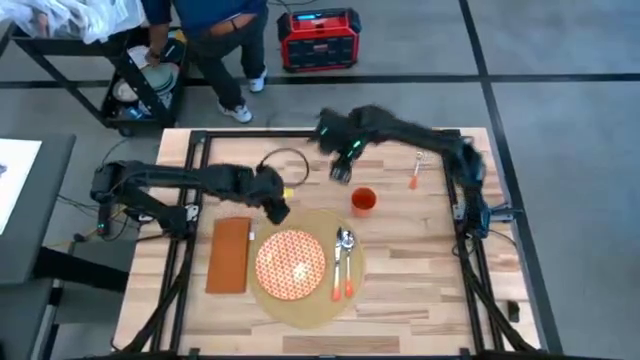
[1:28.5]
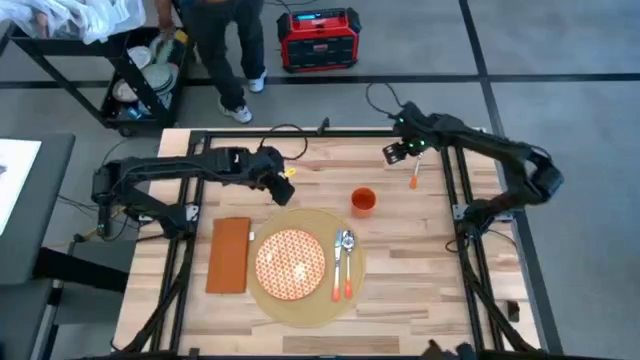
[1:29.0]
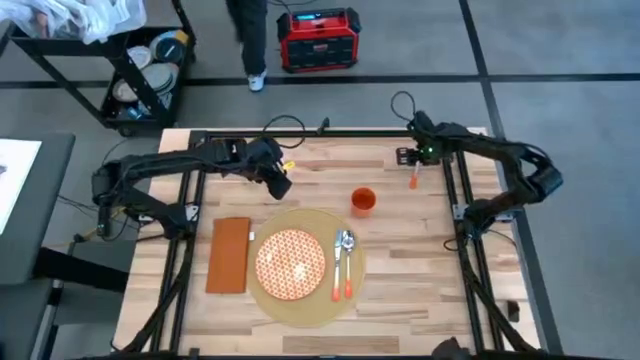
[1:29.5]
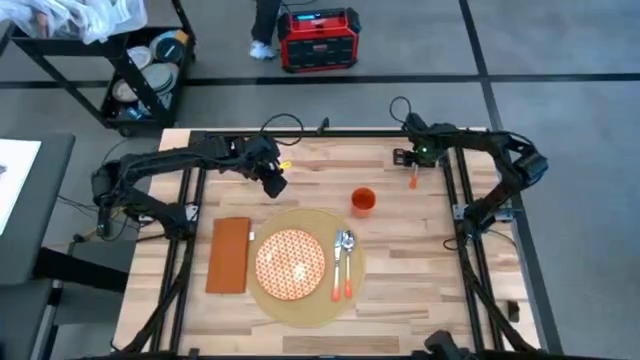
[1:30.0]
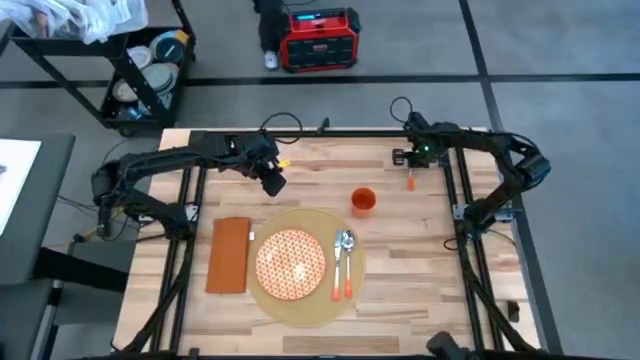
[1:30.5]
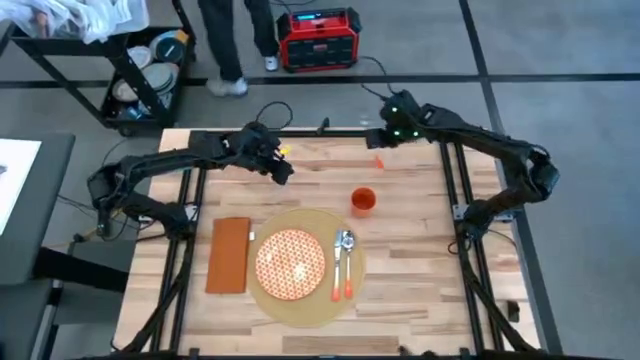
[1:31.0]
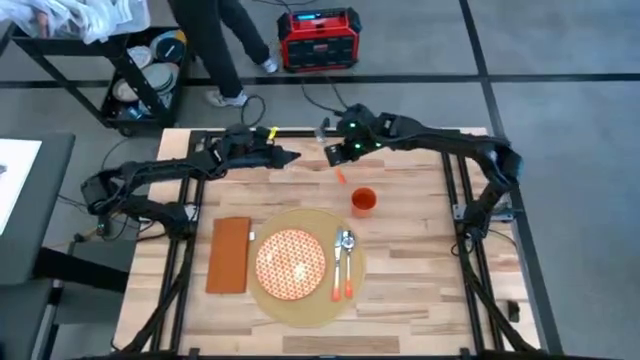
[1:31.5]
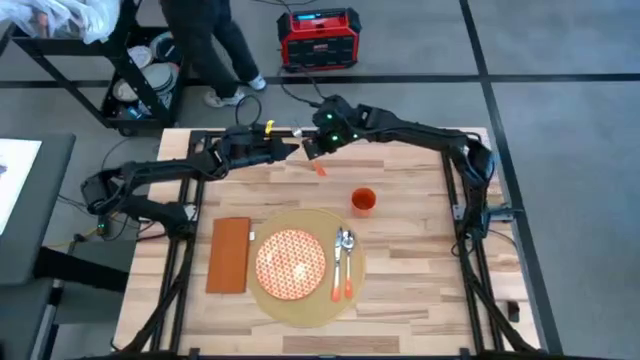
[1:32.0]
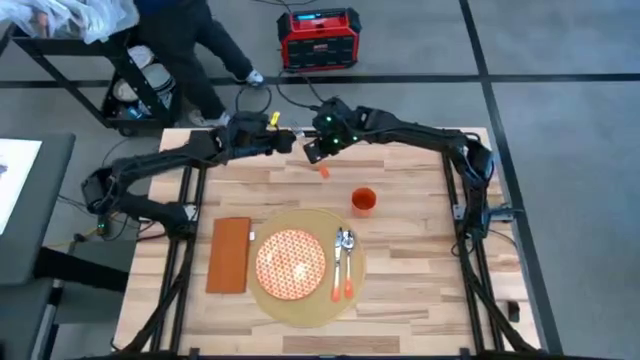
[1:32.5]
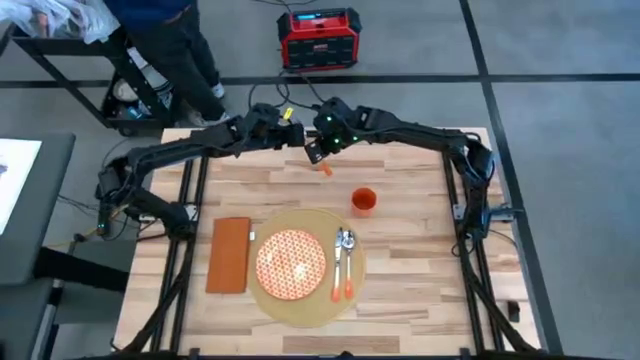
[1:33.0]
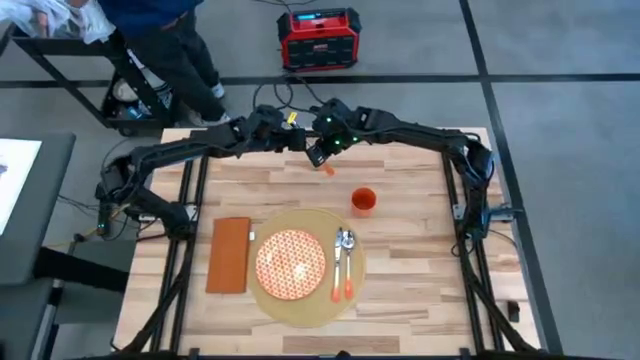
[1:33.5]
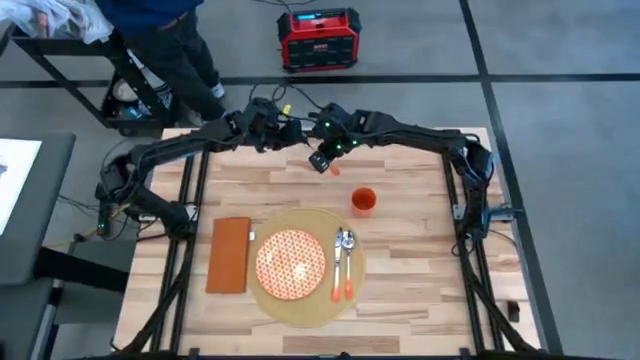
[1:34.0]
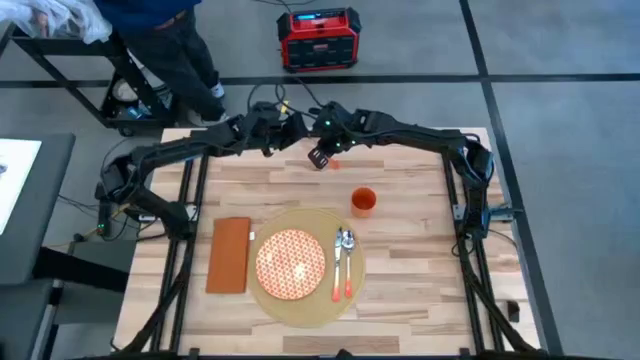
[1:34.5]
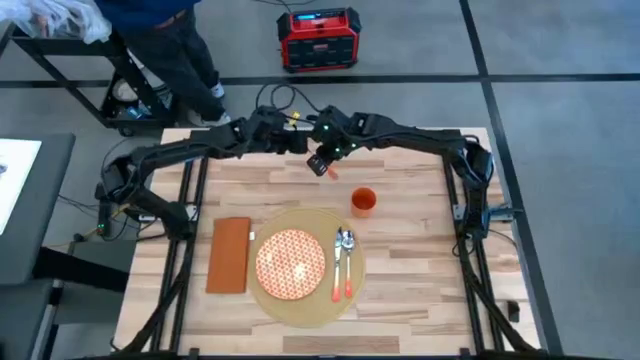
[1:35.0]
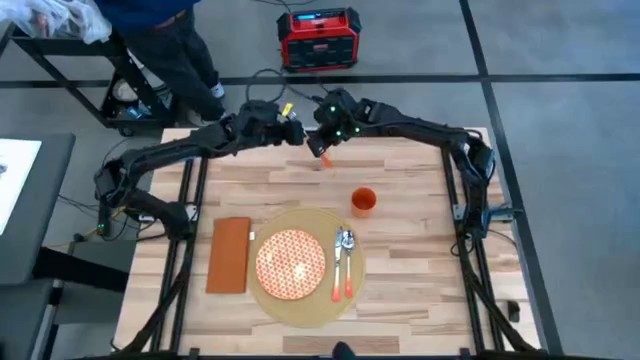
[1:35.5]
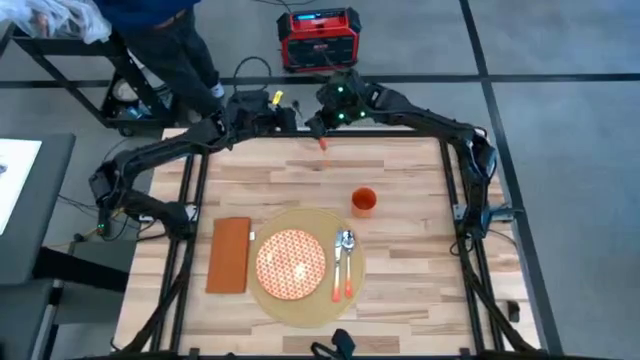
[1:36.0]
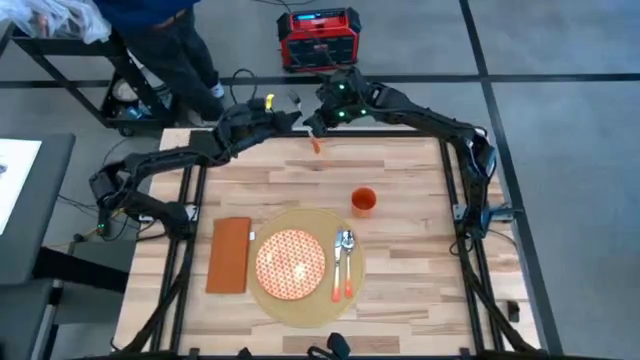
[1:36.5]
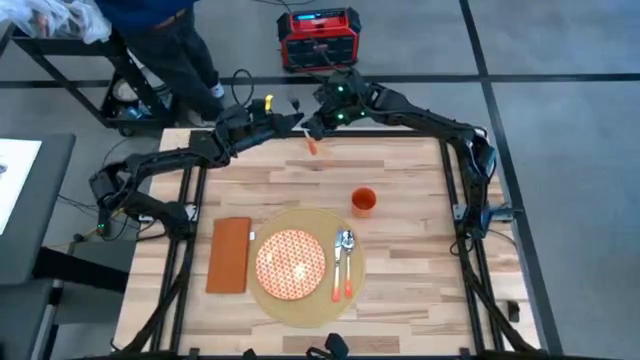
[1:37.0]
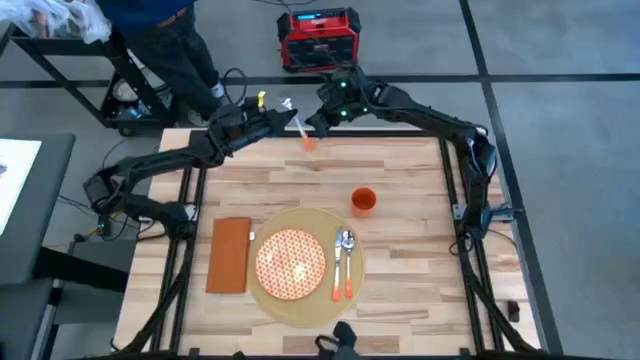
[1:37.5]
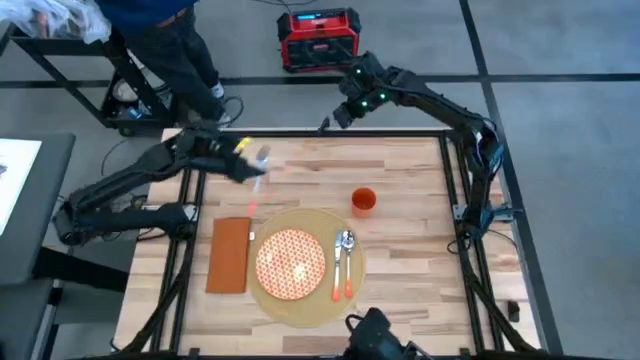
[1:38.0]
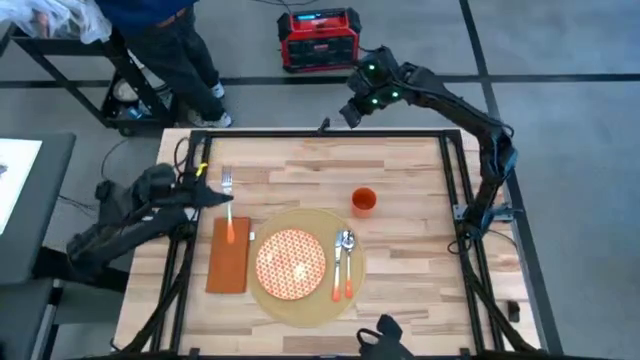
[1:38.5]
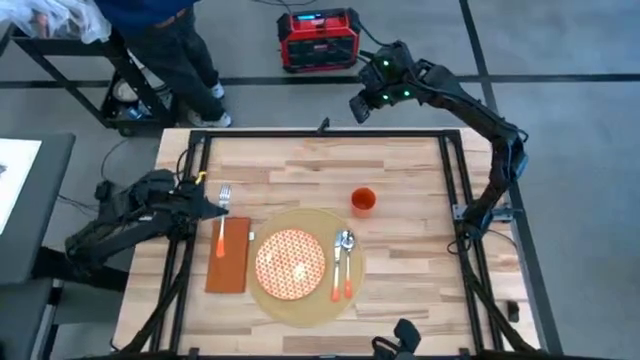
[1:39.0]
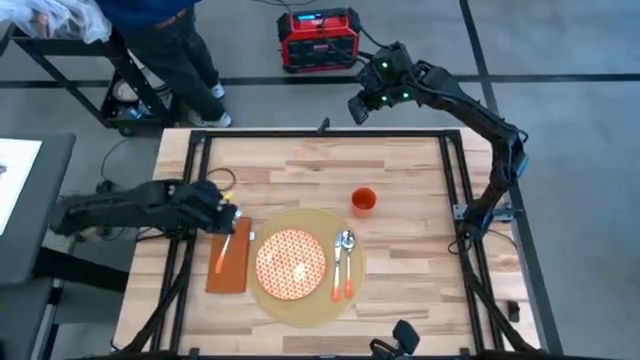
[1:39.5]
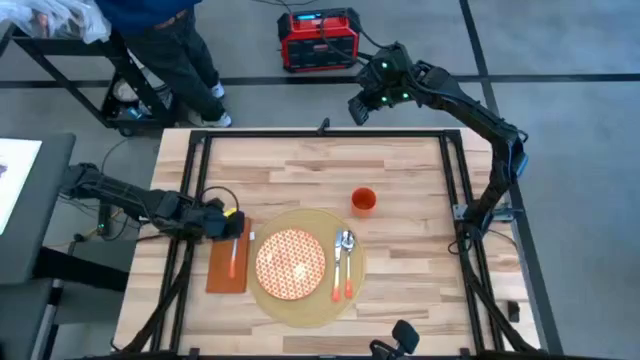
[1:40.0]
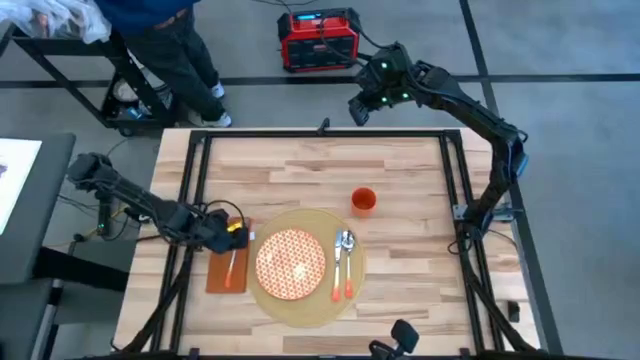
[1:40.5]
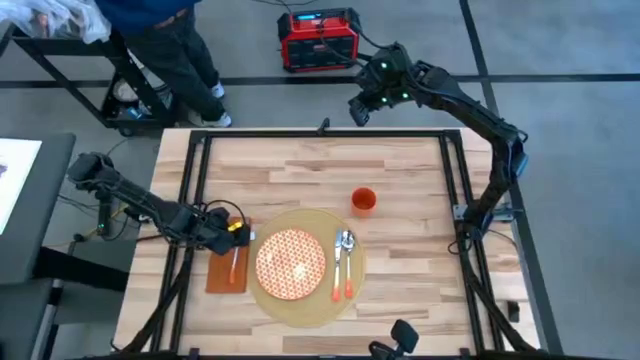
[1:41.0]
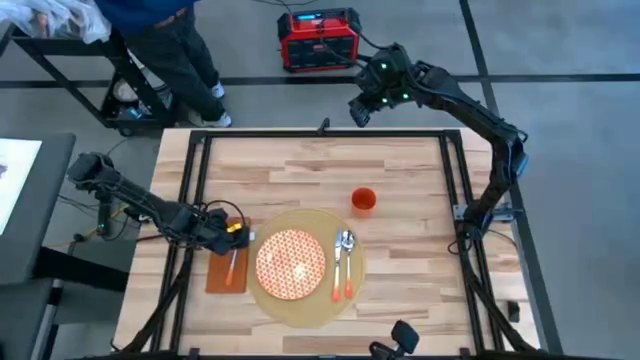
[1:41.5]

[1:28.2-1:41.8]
Task: Set table place
Put the orange fork on the orange napkin

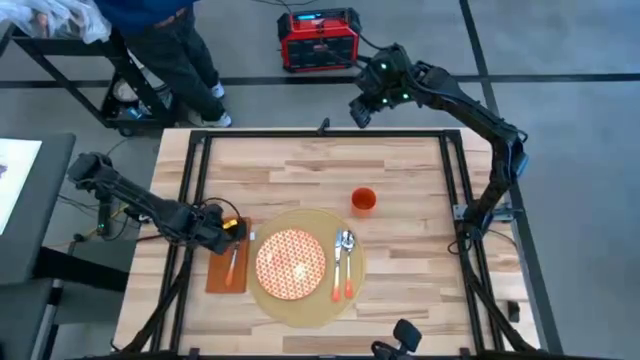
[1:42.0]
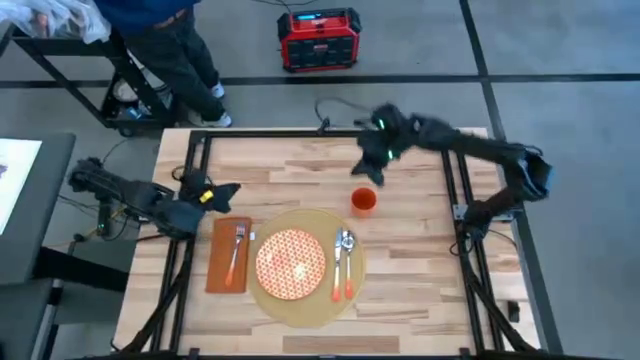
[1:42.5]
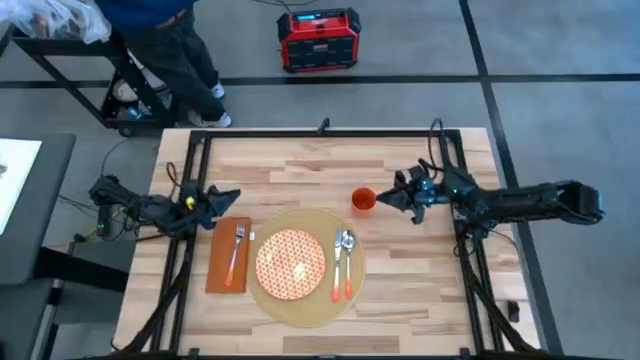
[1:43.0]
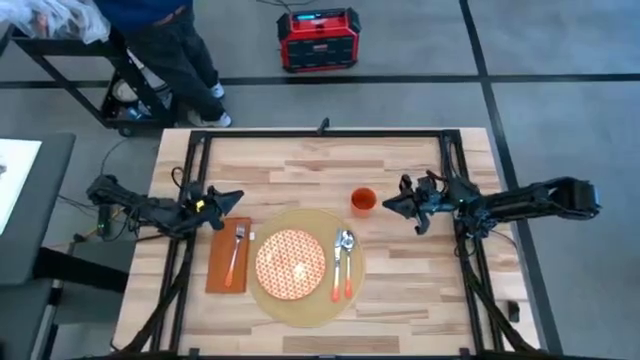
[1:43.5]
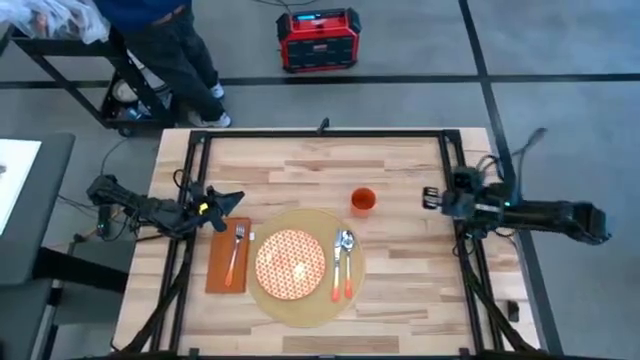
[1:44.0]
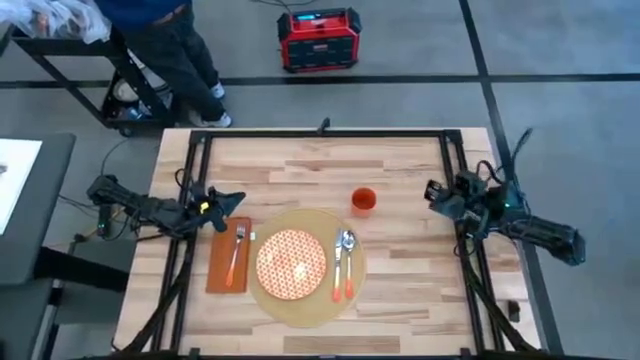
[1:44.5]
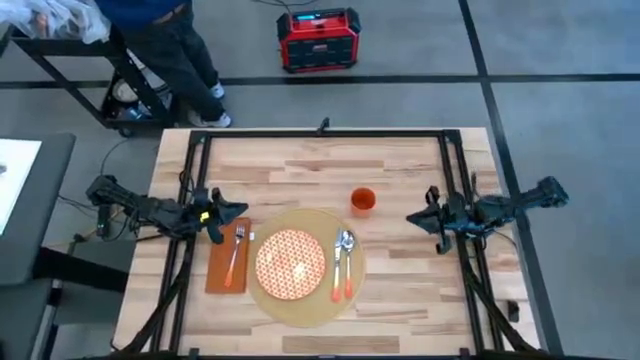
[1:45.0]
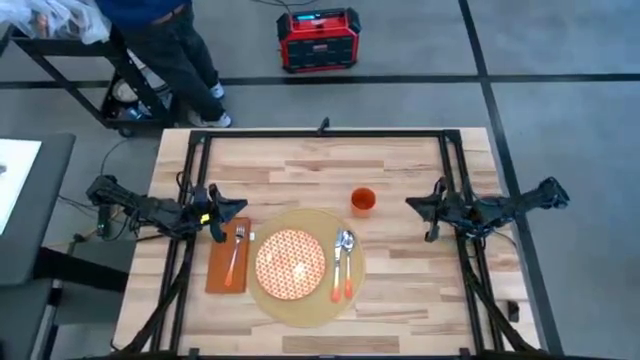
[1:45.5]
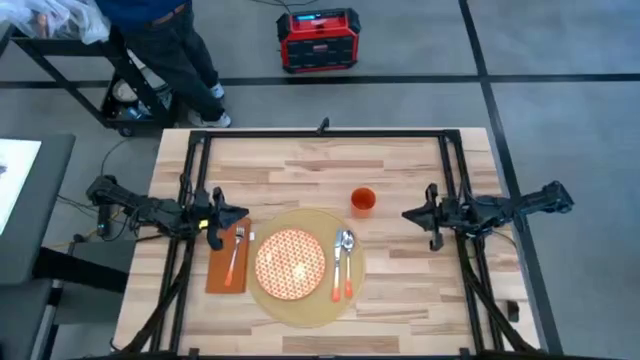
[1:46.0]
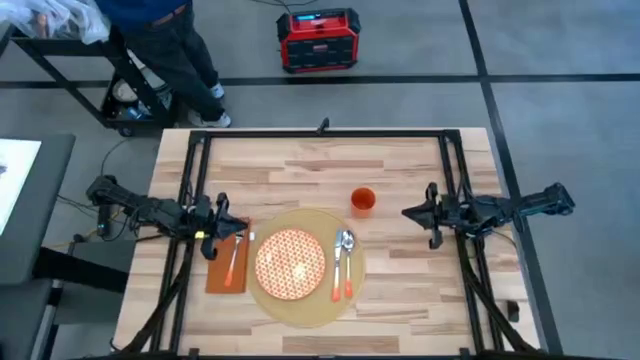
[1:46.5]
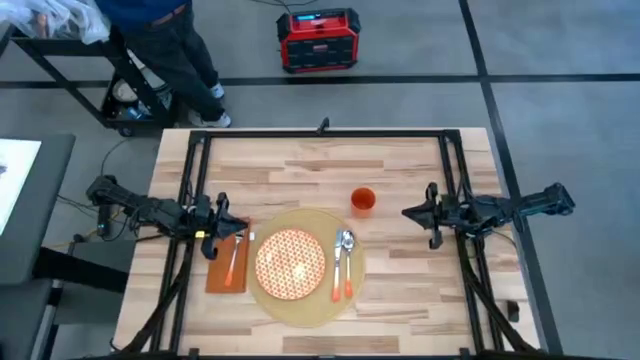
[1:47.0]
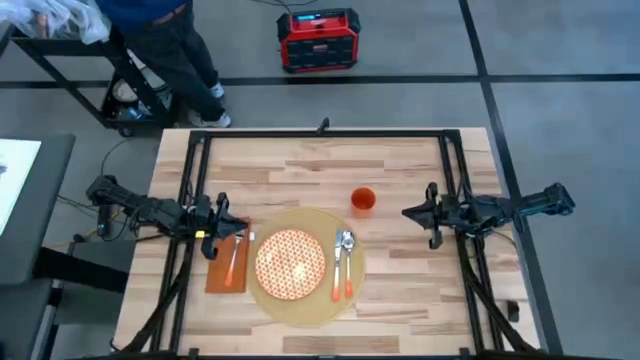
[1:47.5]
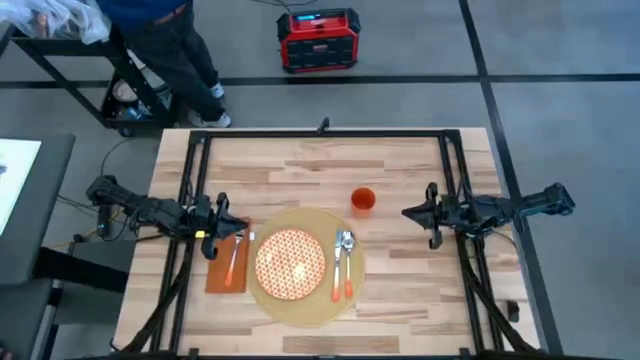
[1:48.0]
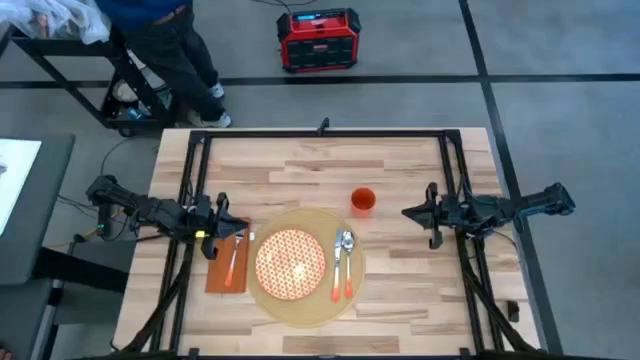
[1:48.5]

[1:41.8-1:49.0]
Return to Home Position
